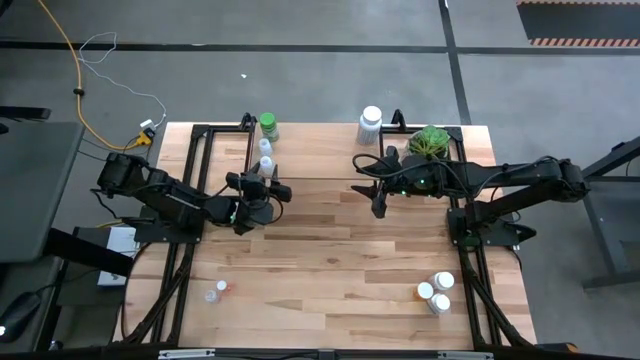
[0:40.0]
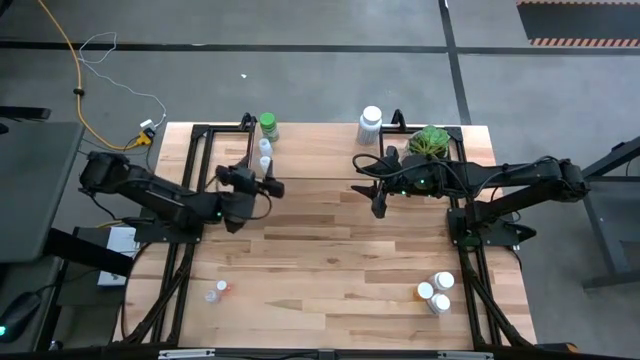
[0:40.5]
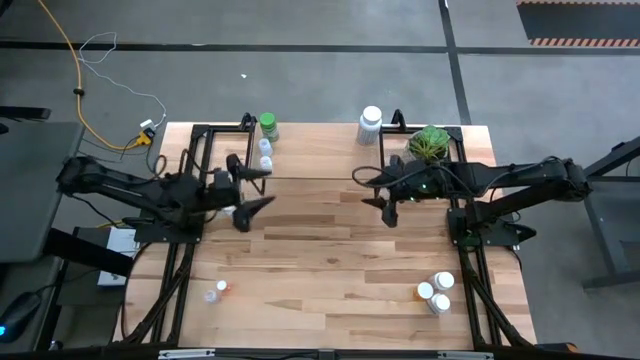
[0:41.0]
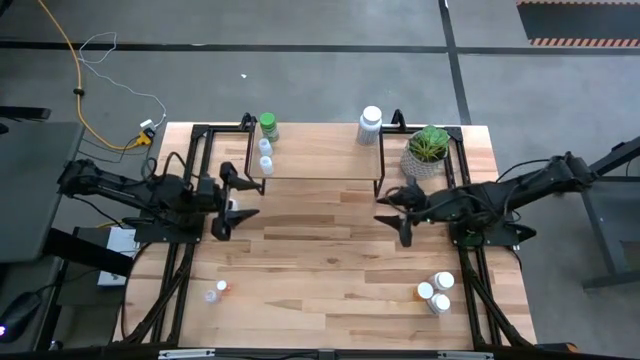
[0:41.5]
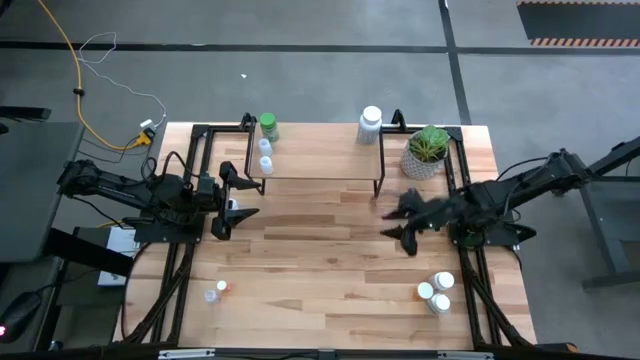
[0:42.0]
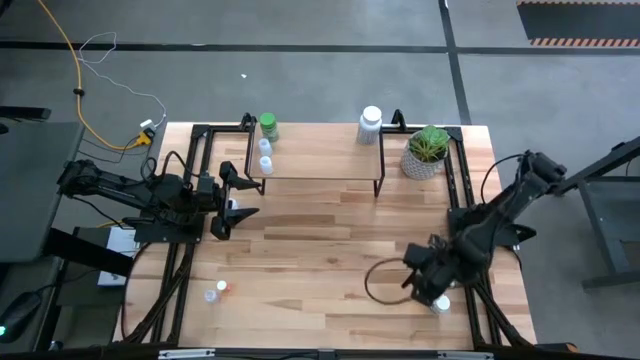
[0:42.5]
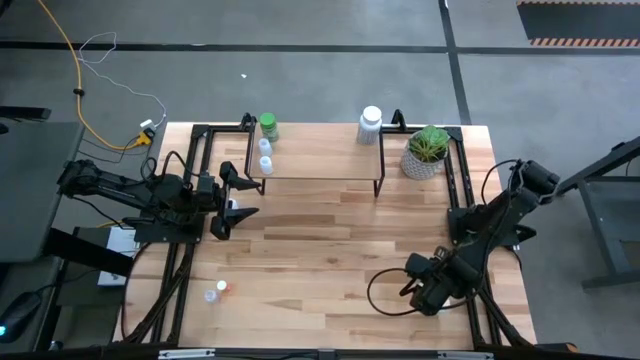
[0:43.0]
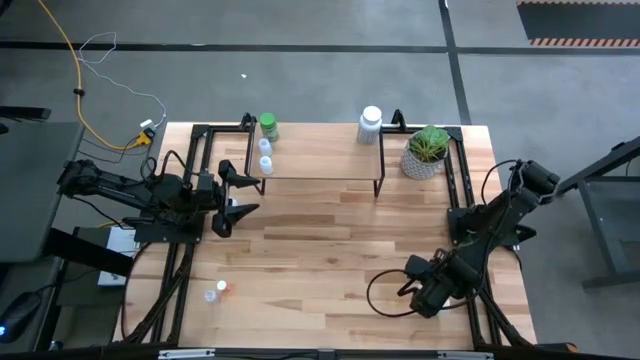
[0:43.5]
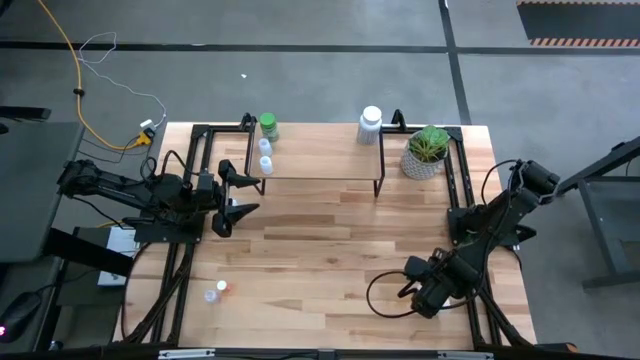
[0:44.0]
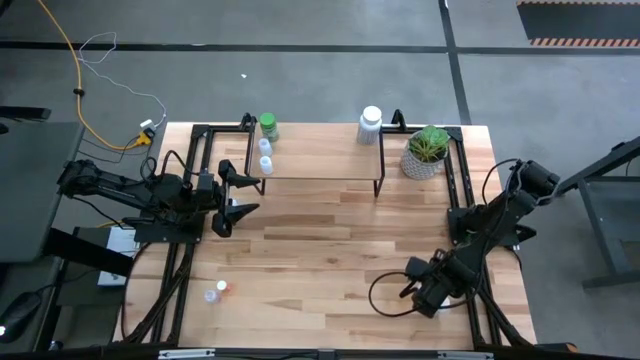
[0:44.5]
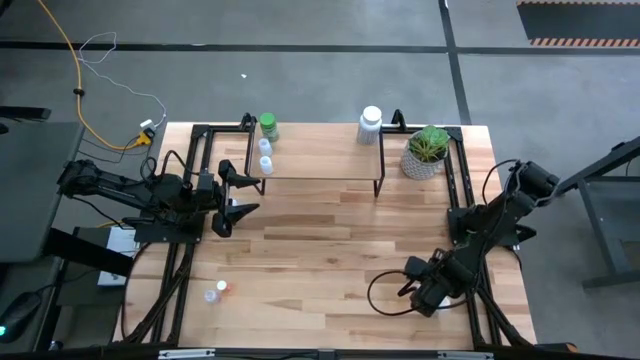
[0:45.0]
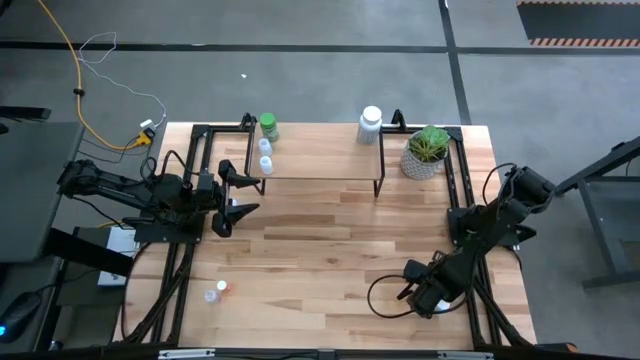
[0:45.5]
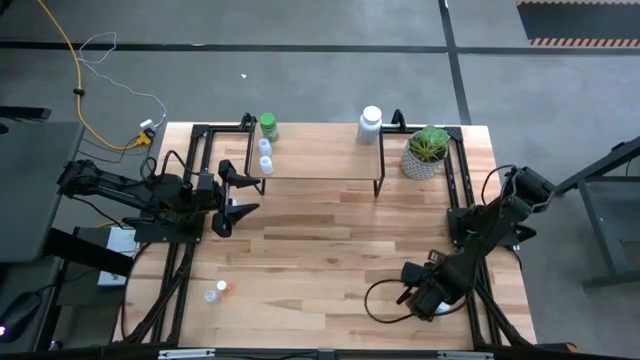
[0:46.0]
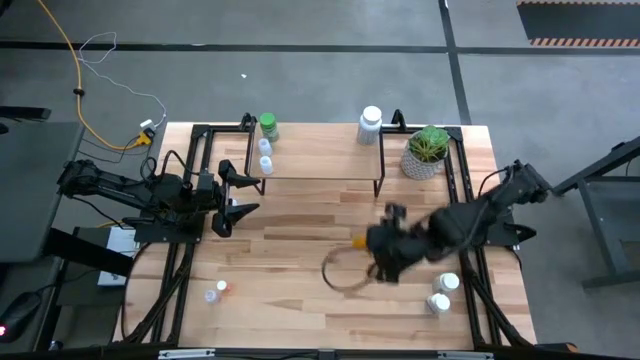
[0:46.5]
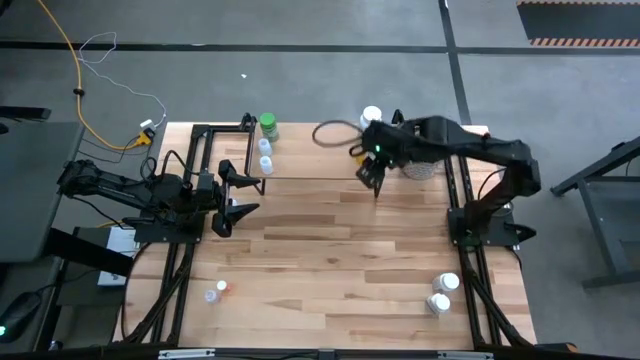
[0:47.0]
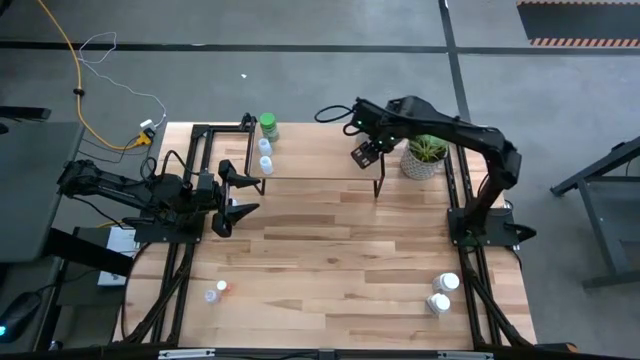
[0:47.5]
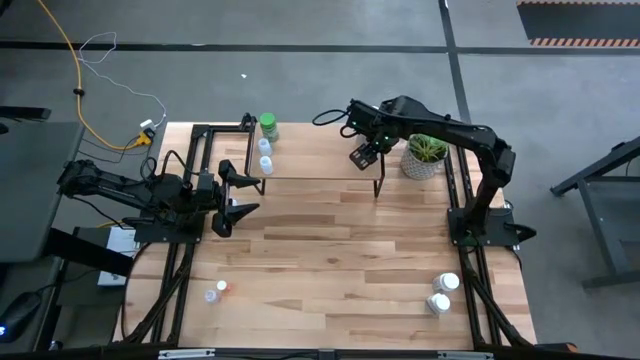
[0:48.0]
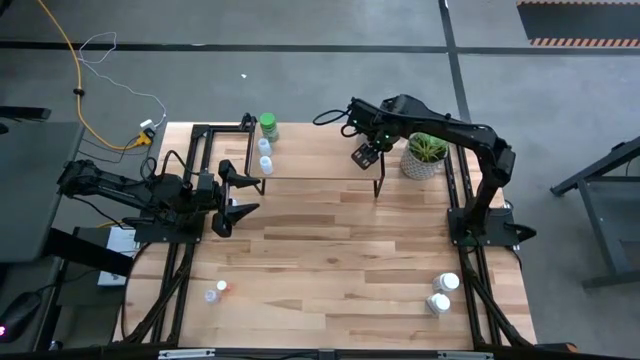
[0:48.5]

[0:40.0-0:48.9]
Task: Pick and place medicine bottles onto shelf by color
Put the orange transparent bottle on the shelf

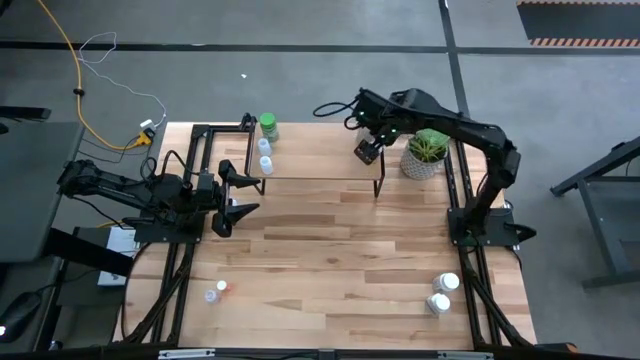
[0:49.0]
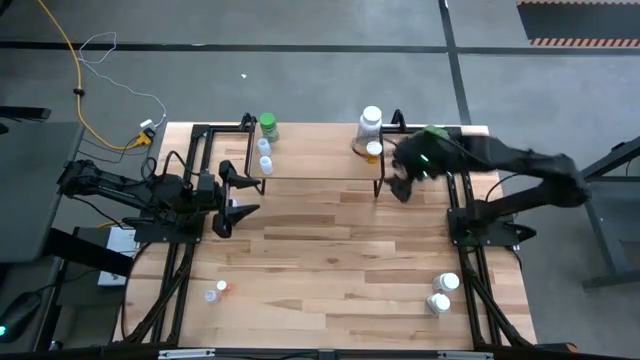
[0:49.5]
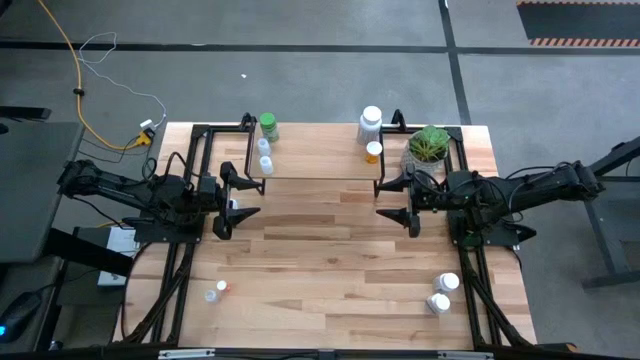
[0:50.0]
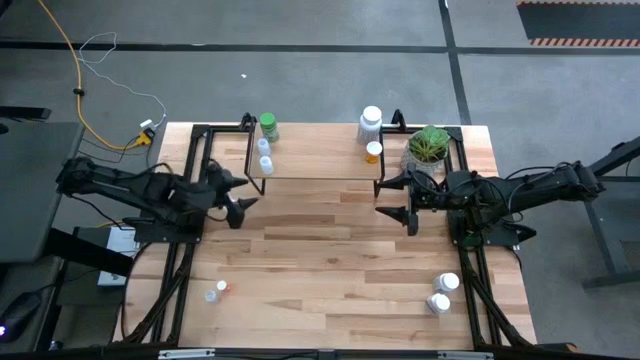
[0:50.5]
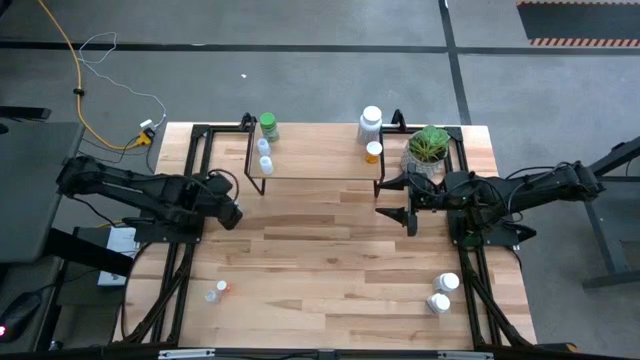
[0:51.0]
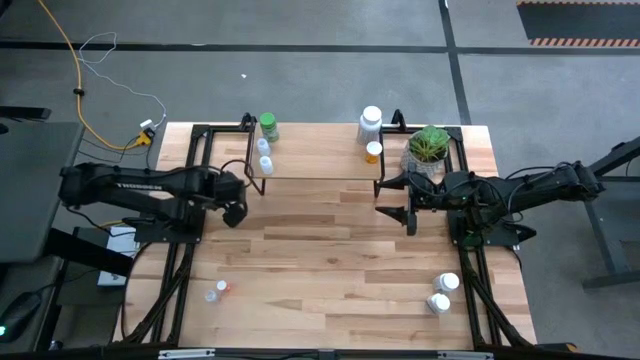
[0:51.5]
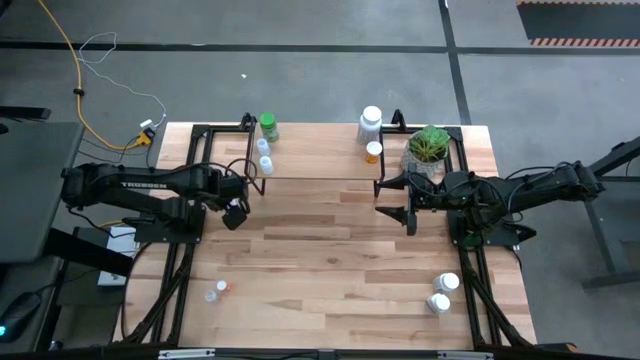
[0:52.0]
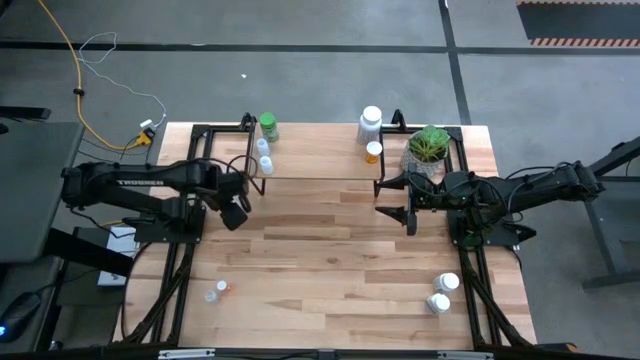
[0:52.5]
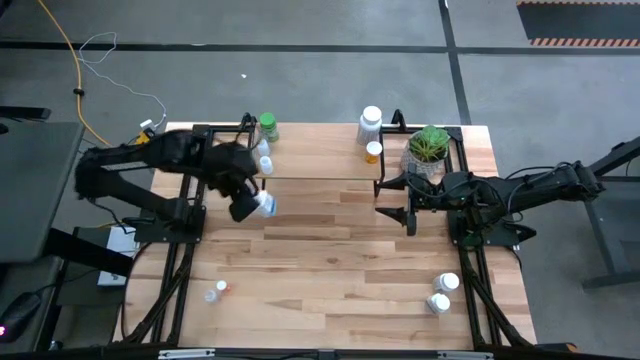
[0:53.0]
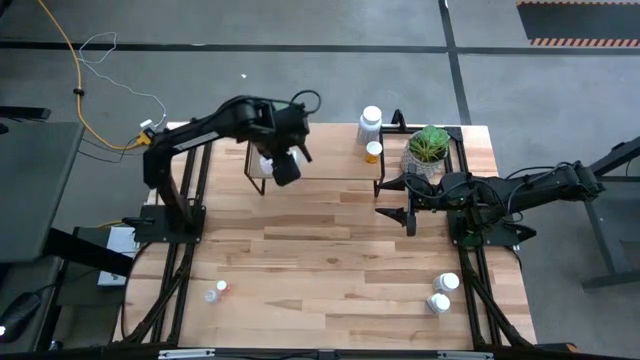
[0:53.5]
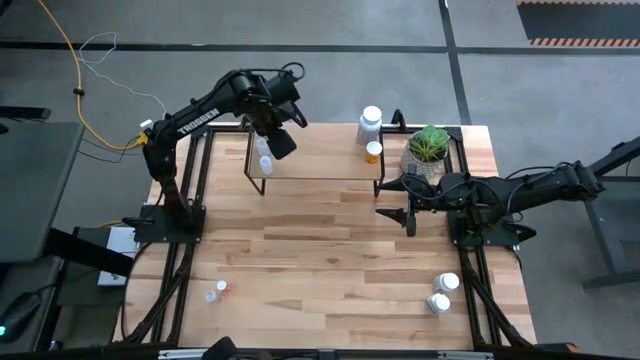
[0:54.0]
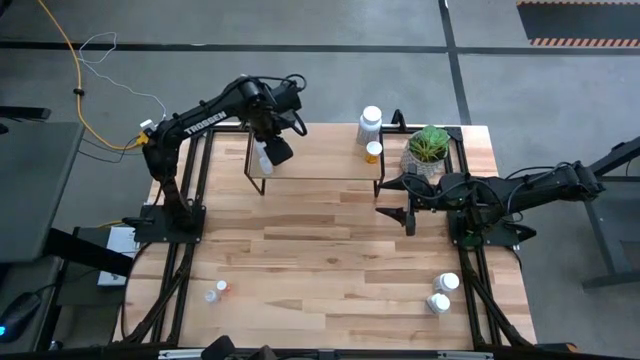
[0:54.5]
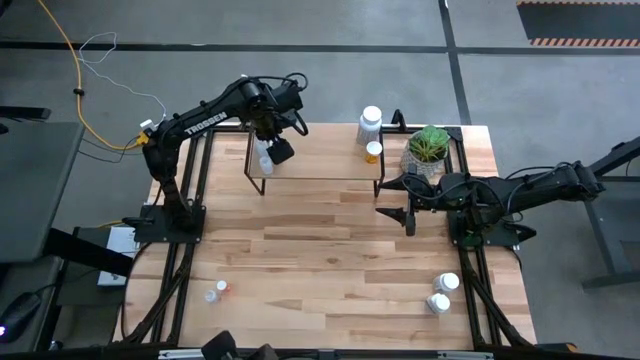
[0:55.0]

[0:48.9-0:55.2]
Put the top white and blue bottle on the shelf

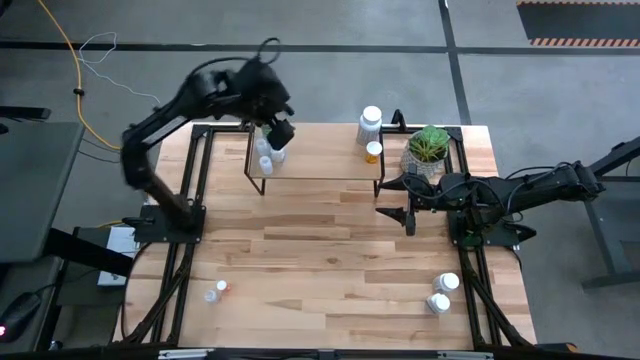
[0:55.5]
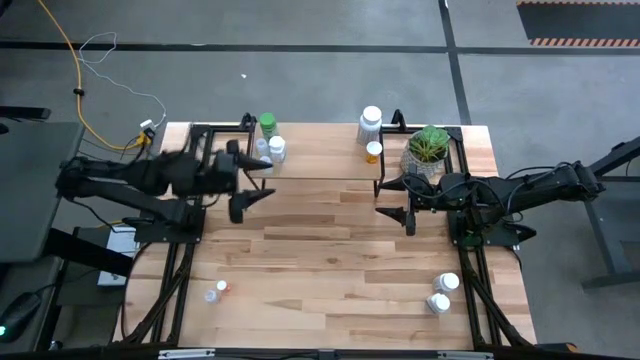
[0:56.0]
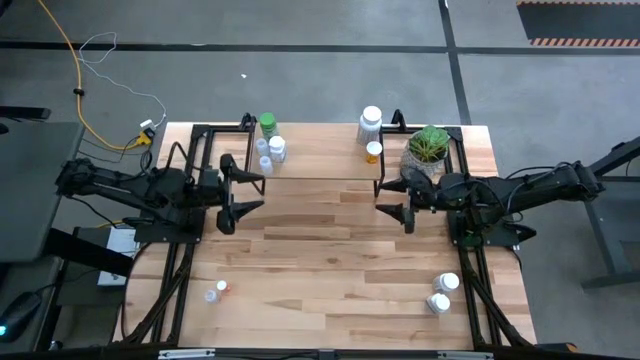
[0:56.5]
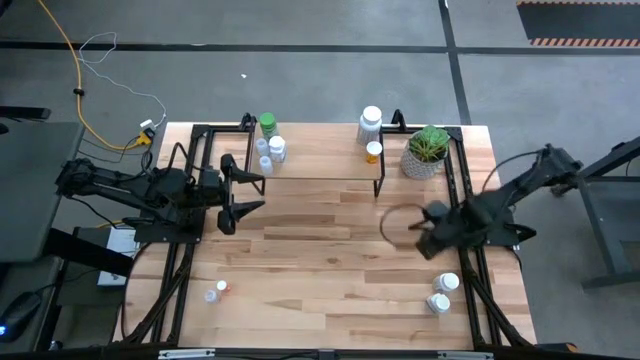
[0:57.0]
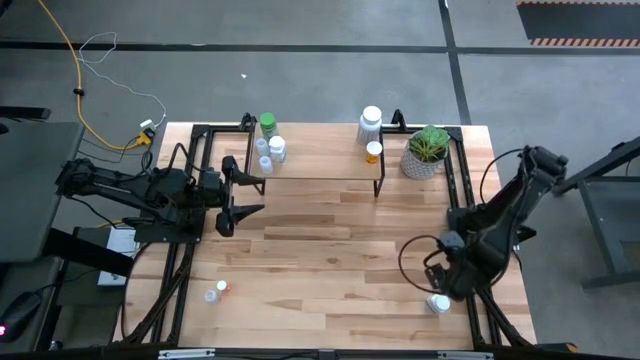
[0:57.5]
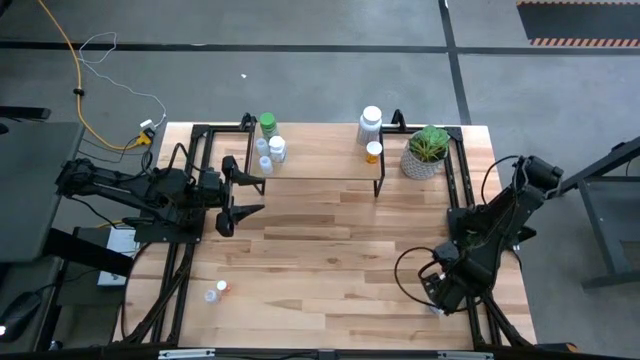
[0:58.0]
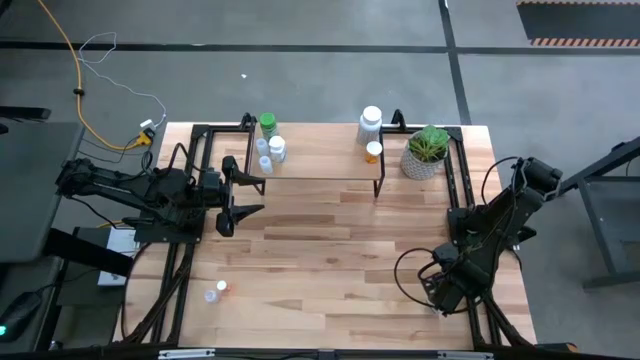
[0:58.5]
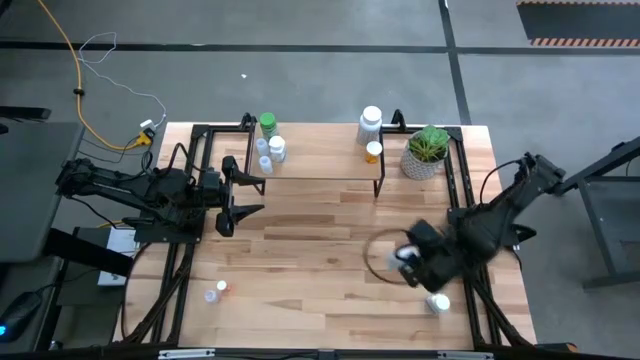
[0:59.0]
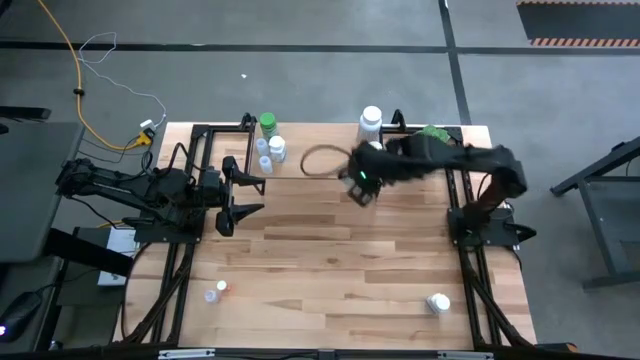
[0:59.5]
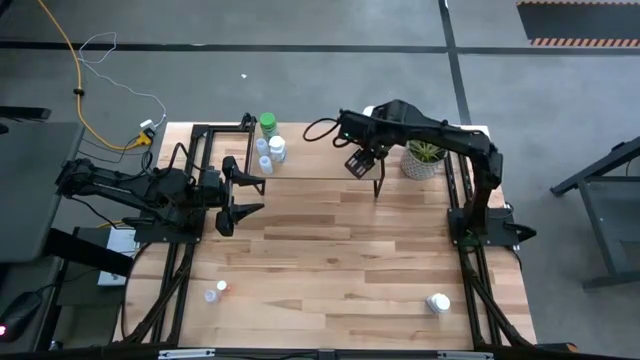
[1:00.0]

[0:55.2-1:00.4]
Put the white and yellow bottle on the shelf

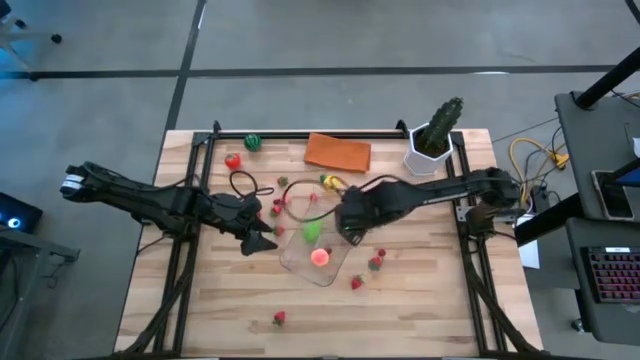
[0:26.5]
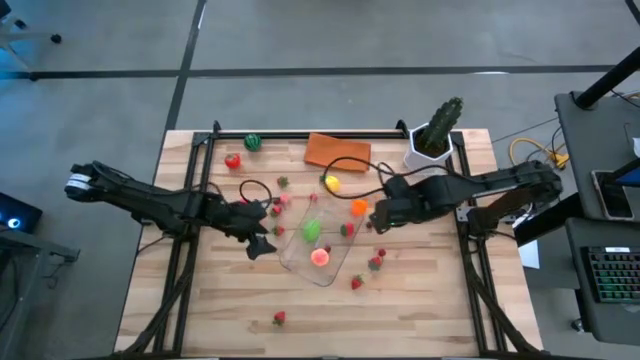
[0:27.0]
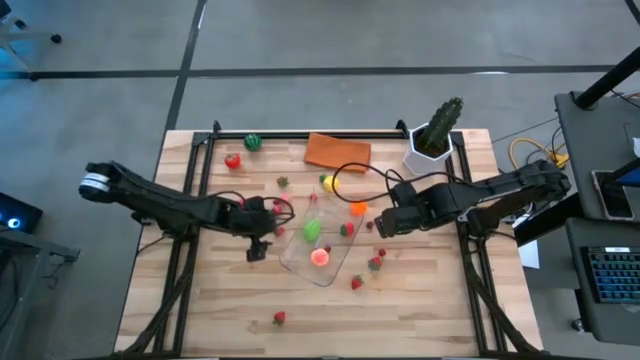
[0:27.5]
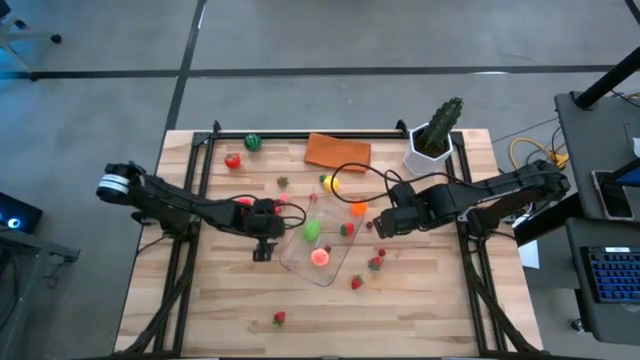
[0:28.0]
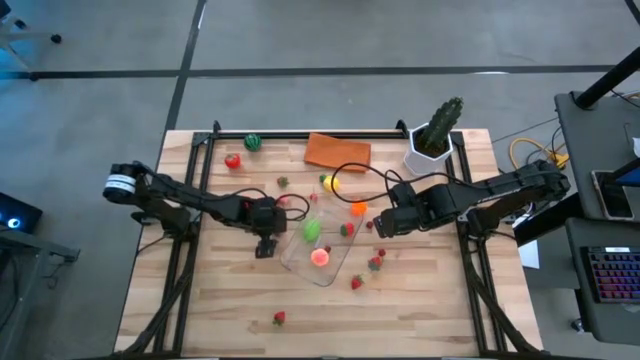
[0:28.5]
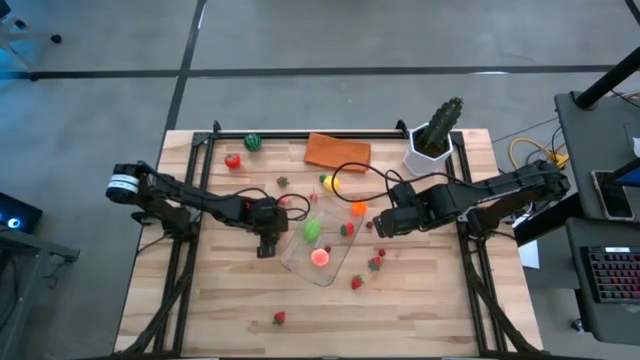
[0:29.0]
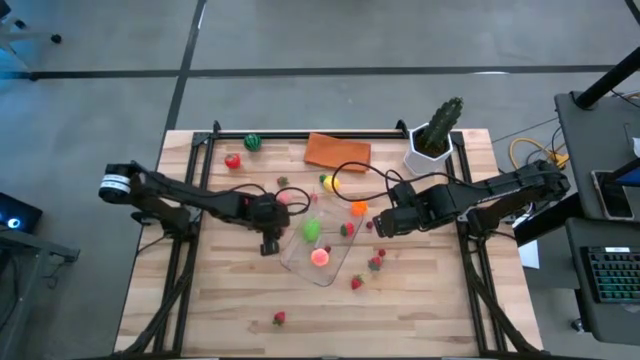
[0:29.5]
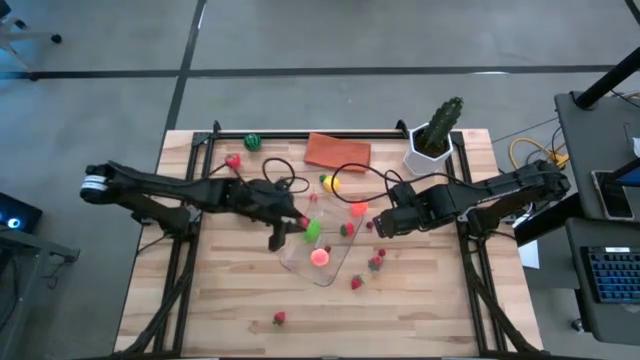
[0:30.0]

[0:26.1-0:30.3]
Task: Pick and placing Produce into tupperware
Put the strawberry into the transparent bin
